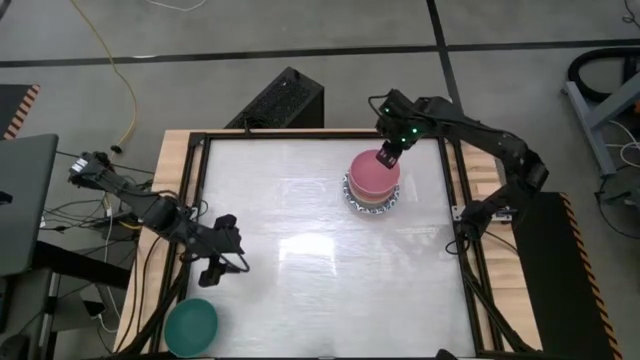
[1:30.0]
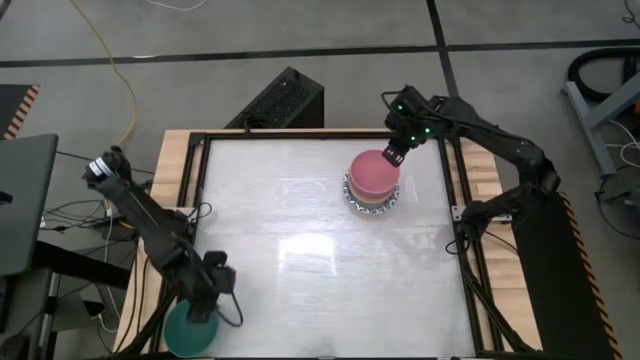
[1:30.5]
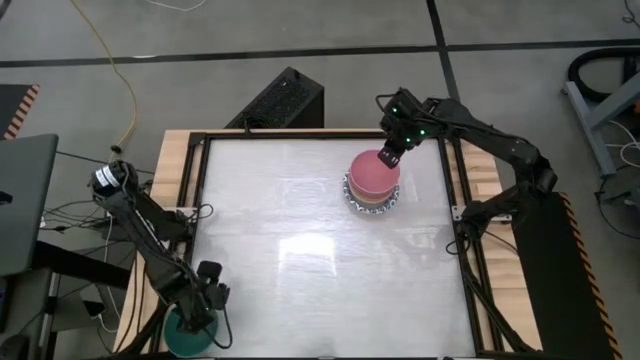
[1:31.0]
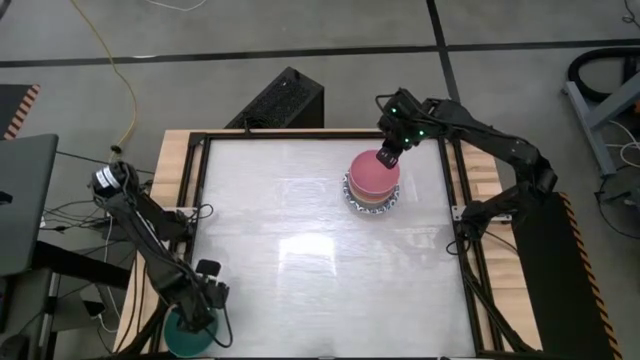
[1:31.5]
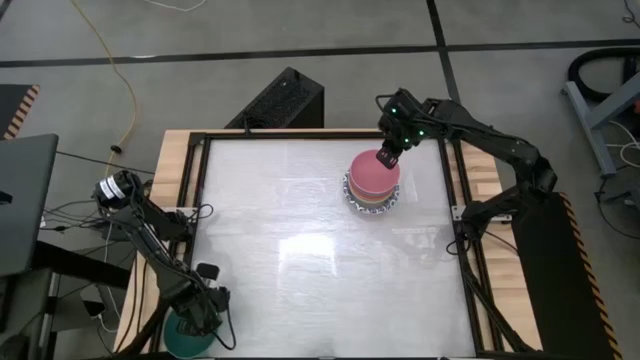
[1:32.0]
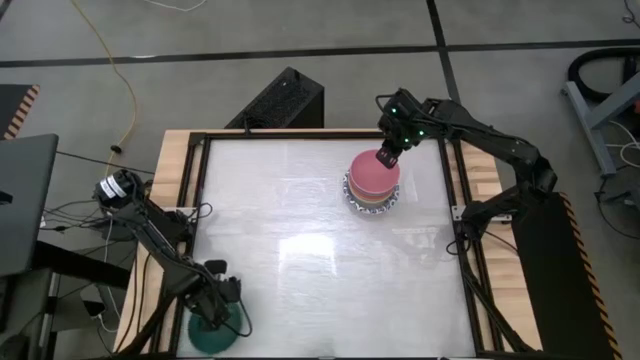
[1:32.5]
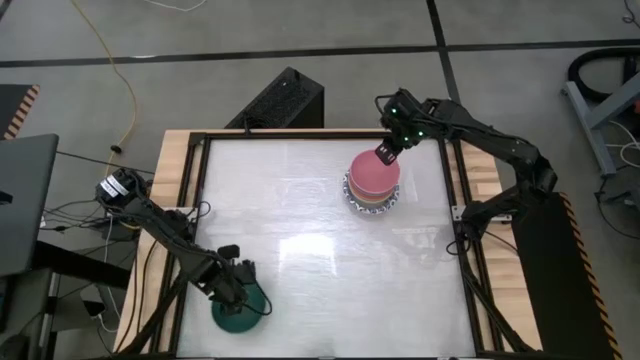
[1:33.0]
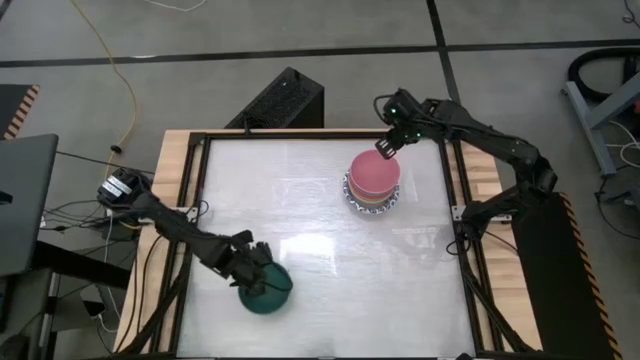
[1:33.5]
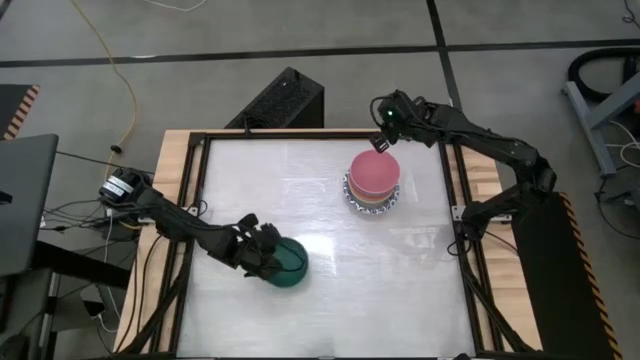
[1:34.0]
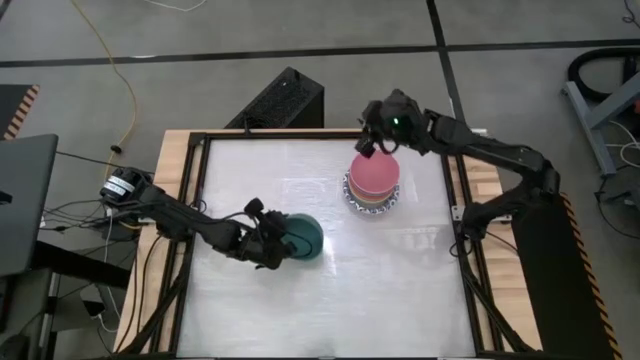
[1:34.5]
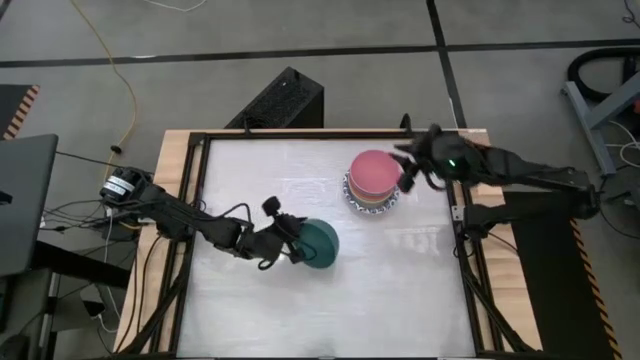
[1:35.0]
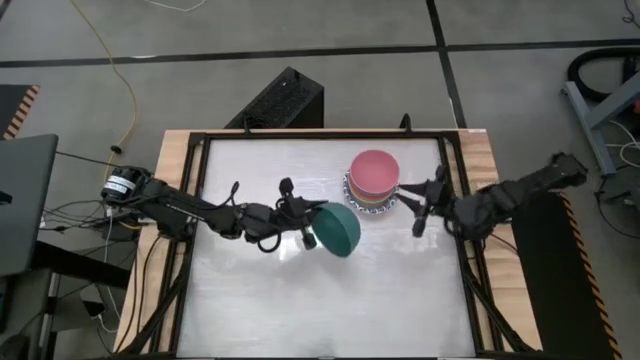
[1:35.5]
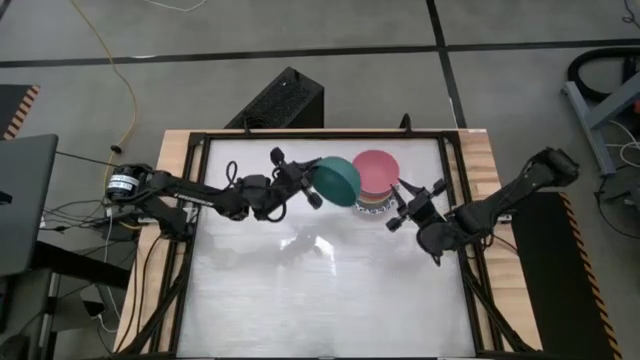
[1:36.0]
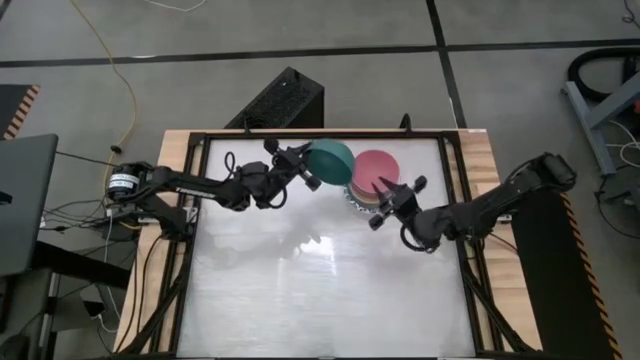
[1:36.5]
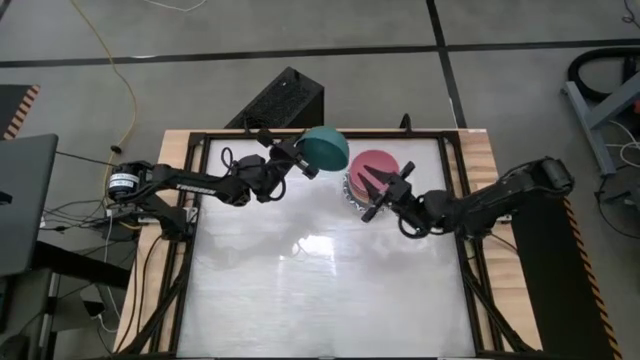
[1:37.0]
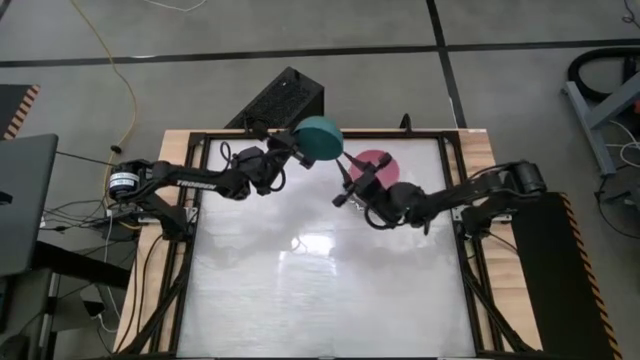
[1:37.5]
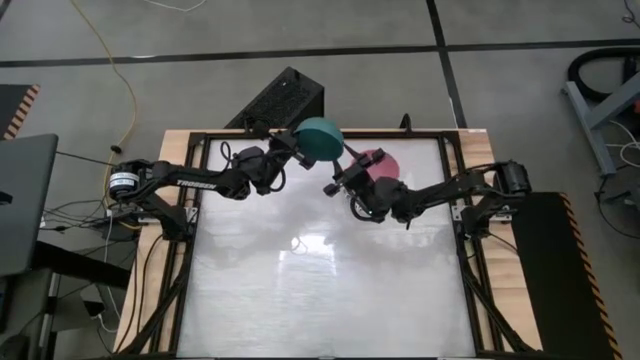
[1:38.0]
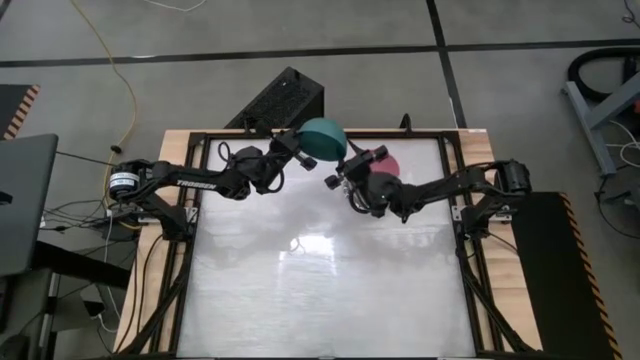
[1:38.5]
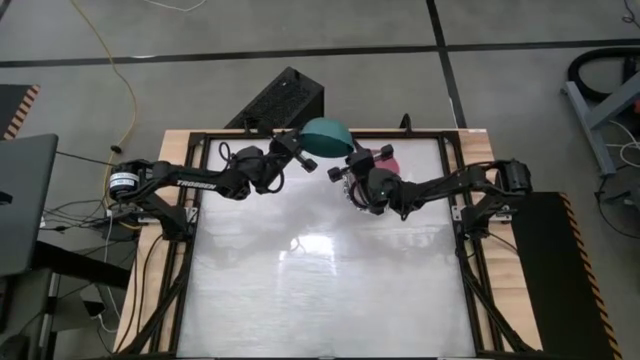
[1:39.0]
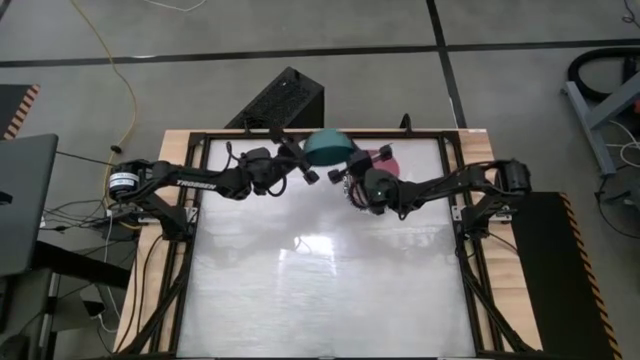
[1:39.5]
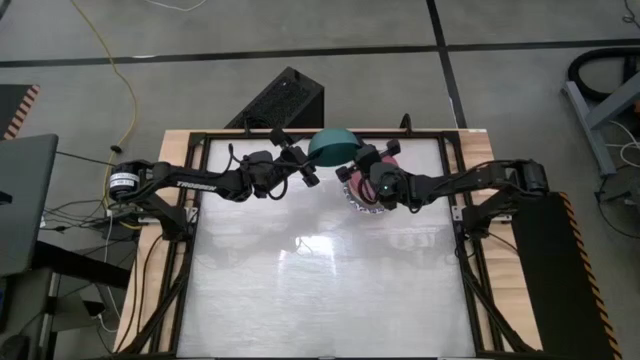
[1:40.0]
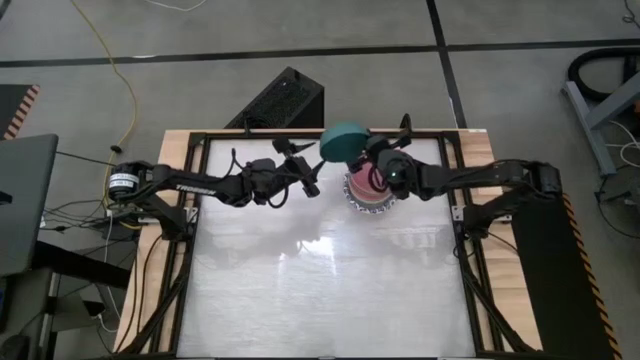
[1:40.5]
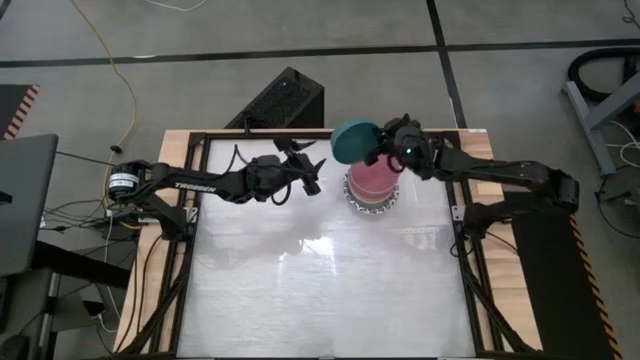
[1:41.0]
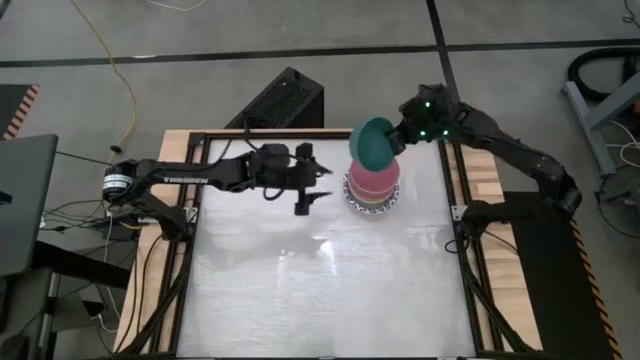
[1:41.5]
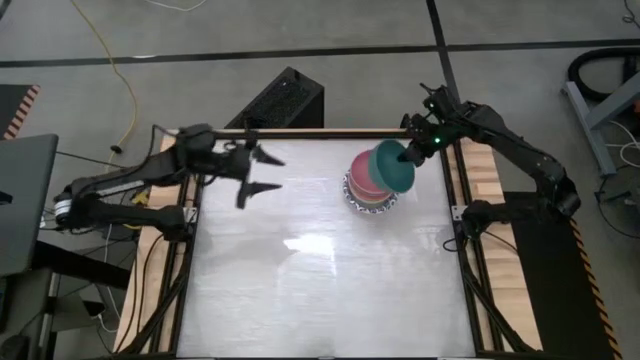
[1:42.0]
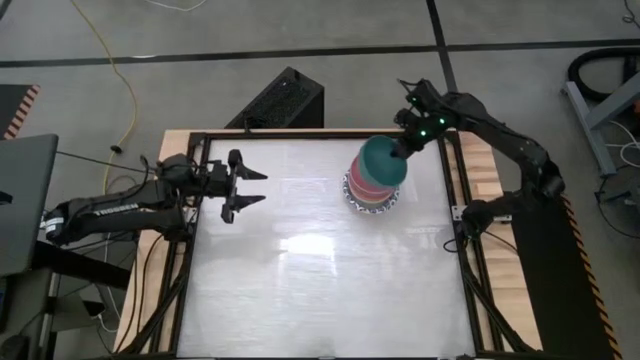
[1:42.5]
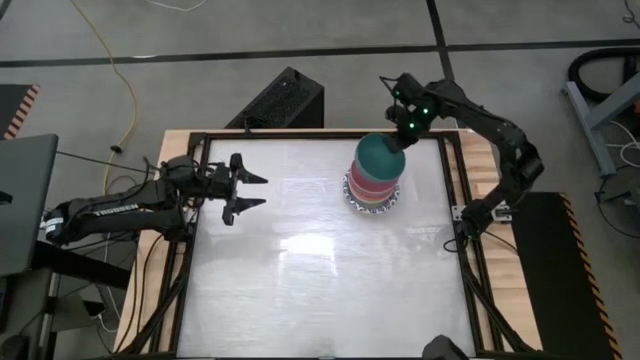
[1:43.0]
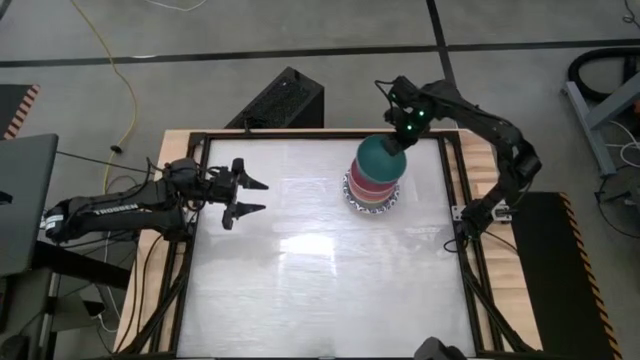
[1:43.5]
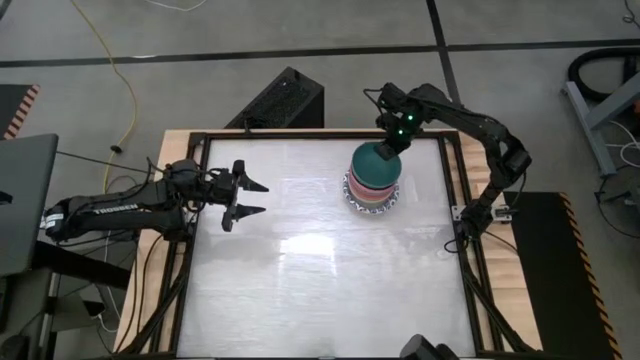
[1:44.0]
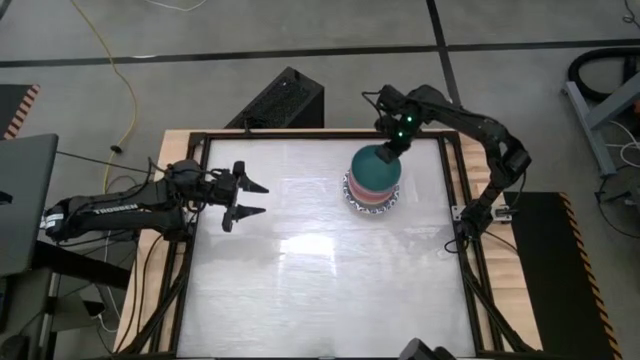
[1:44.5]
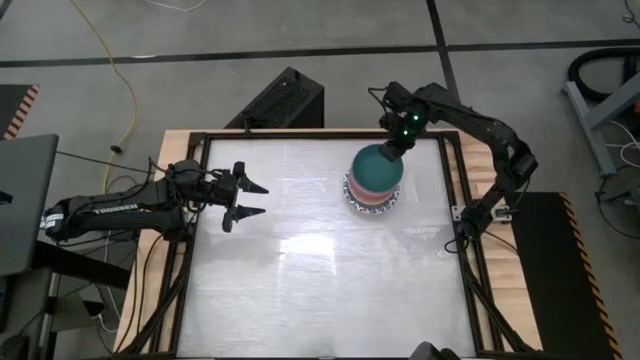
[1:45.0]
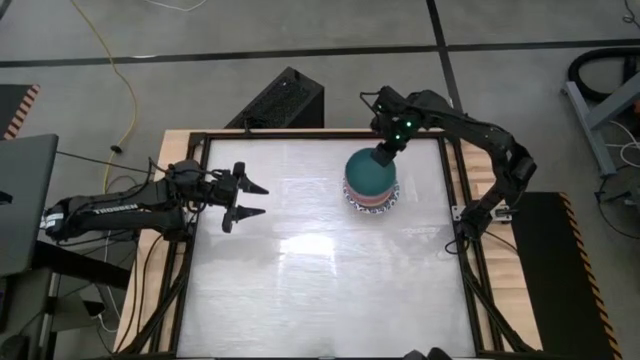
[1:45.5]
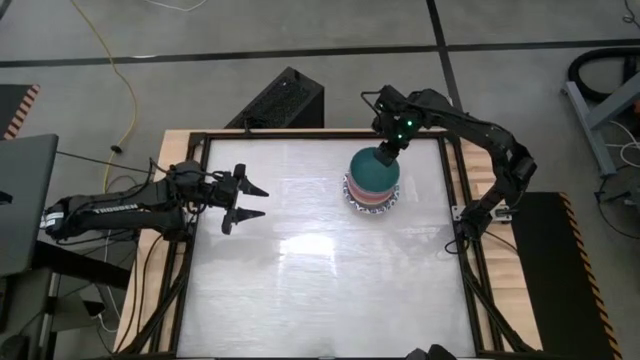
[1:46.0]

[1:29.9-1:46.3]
Stack the green bowl on top of the pink bowl
